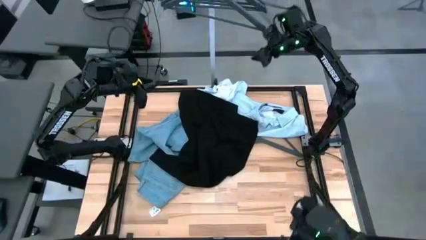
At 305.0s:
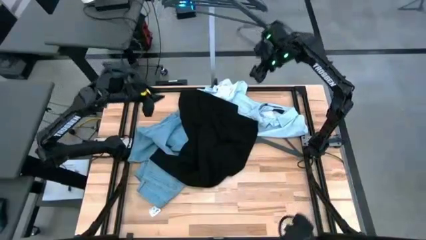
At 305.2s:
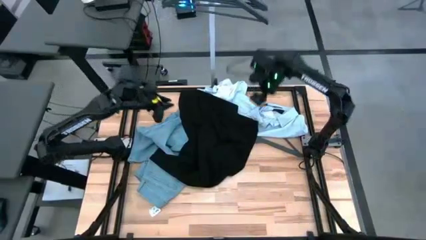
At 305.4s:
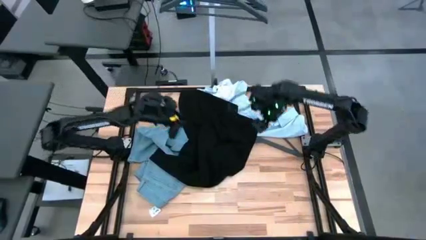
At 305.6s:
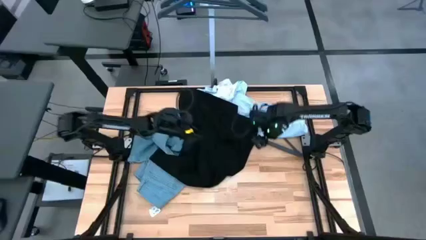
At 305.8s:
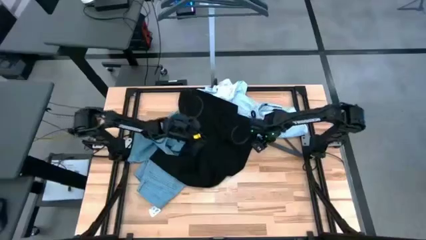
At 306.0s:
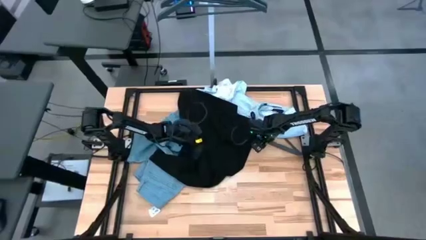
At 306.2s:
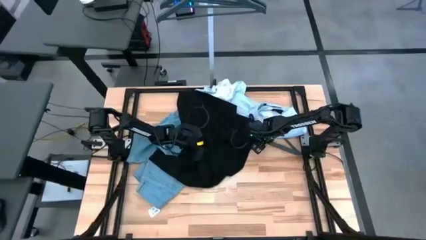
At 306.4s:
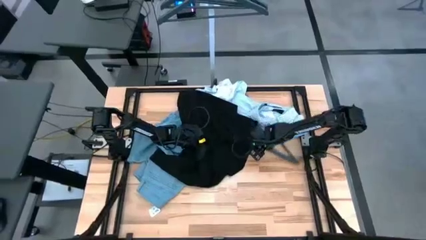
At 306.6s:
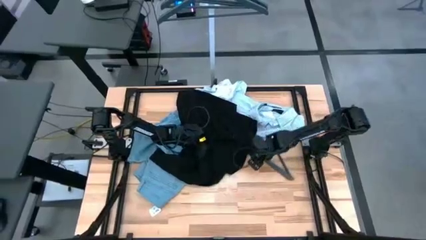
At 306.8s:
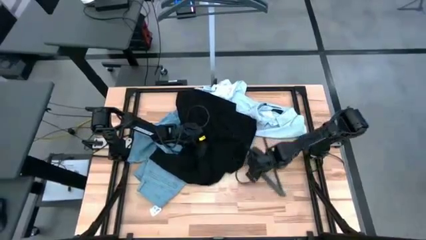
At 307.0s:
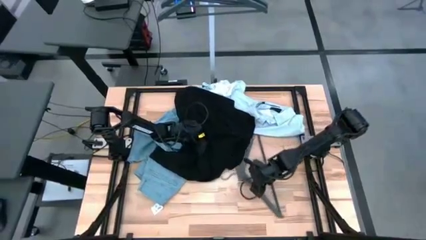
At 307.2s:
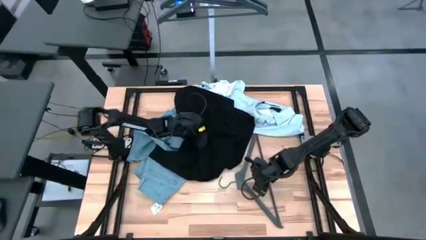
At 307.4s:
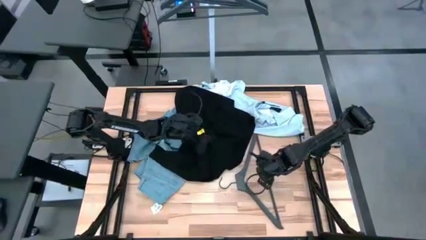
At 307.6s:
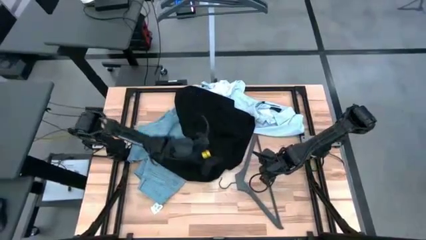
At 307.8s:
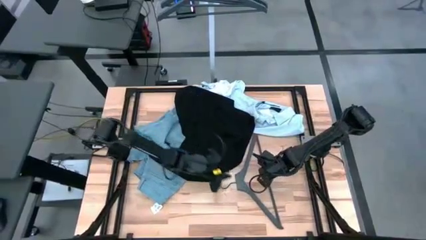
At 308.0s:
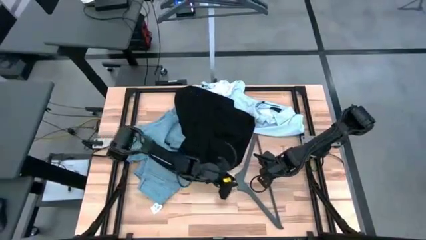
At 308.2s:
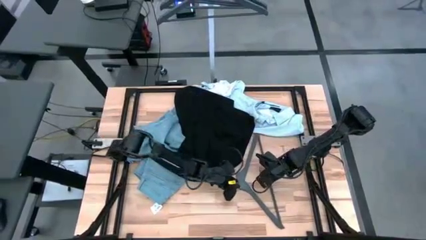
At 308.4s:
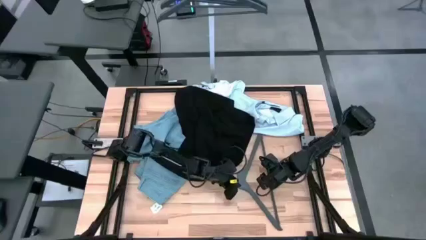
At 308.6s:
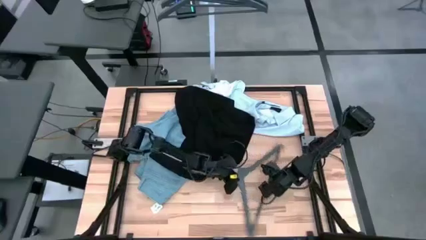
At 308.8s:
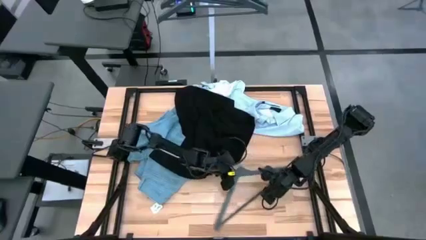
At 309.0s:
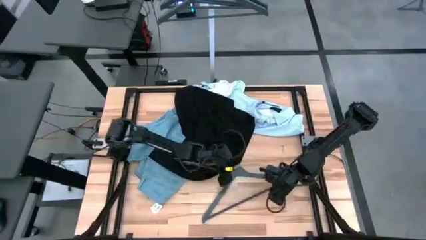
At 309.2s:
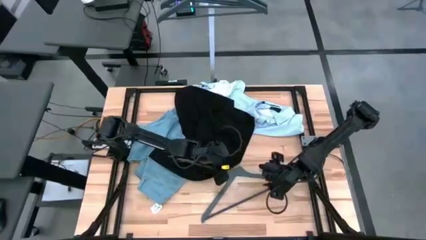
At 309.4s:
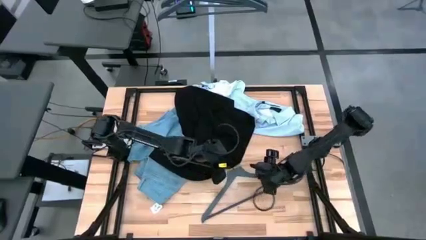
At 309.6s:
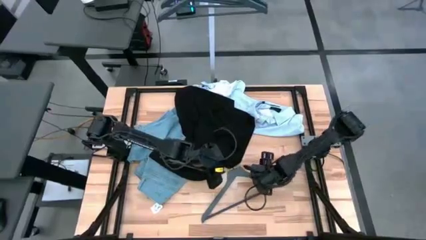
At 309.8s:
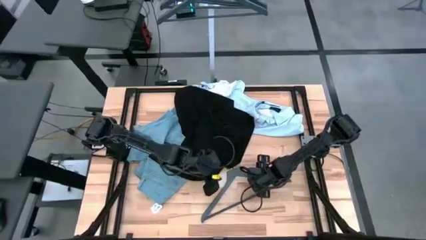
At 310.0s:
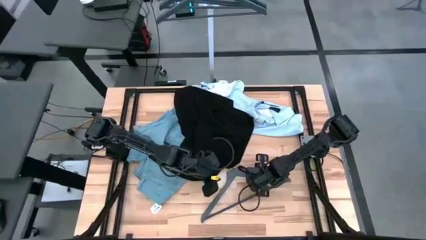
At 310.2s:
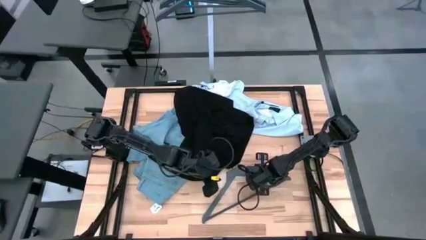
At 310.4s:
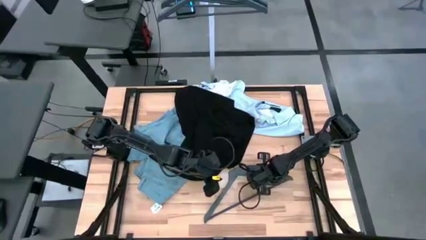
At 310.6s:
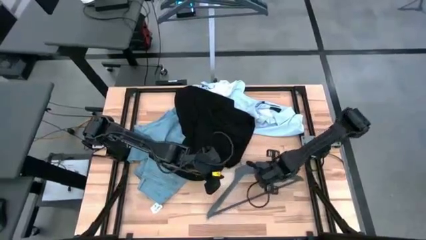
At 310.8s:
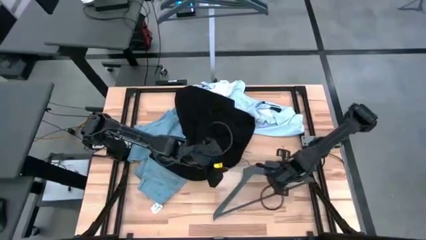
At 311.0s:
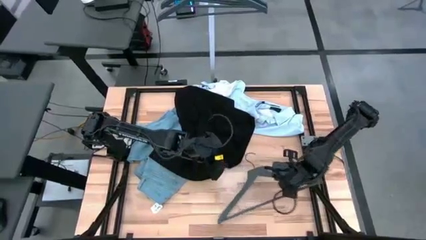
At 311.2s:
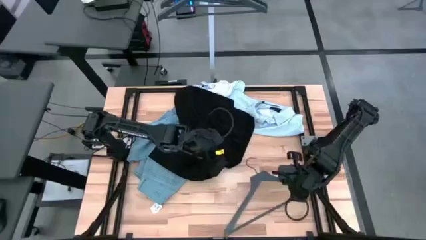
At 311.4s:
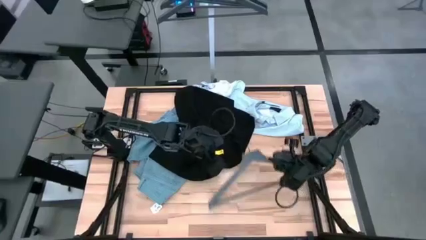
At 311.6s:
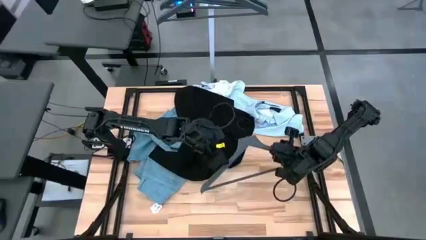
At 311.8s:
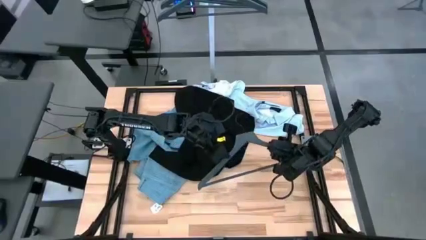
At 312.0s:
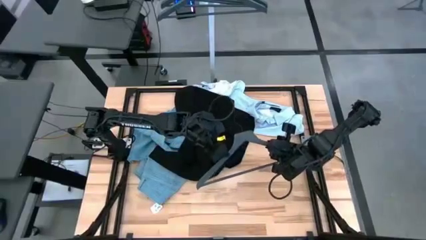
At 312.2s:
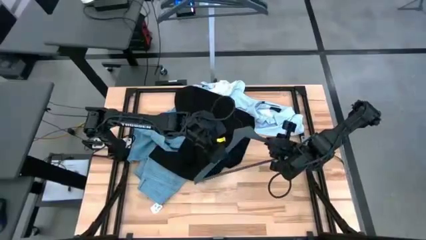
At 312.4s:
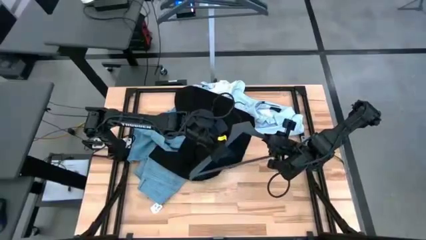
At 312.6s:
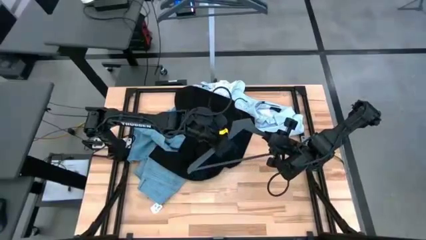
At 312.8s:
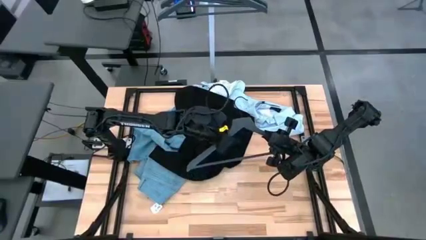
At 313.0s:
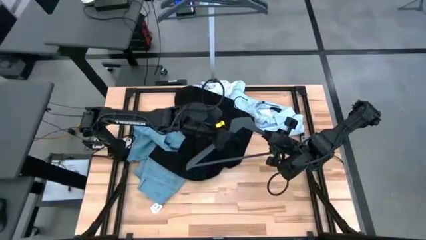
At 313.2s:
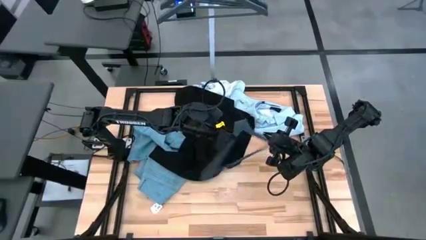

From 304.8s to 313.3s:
Task: Hang clothes
Hang the grey hanger on the rack

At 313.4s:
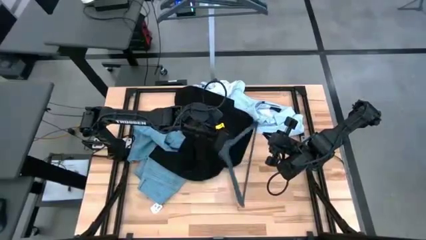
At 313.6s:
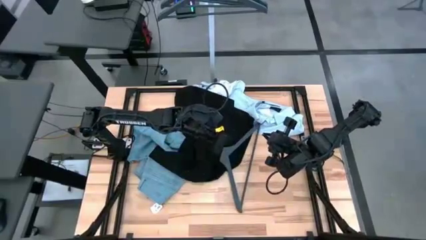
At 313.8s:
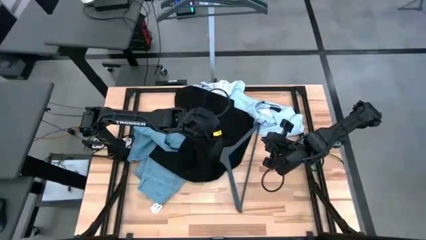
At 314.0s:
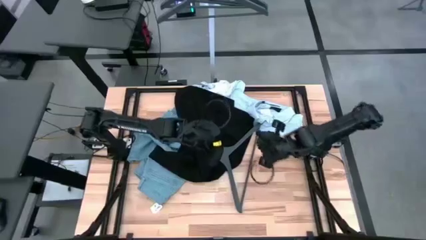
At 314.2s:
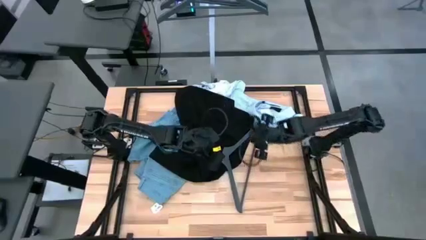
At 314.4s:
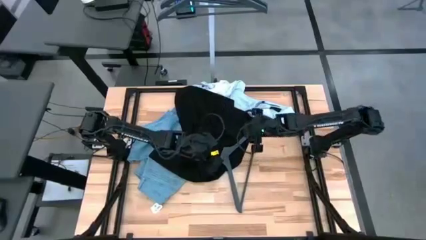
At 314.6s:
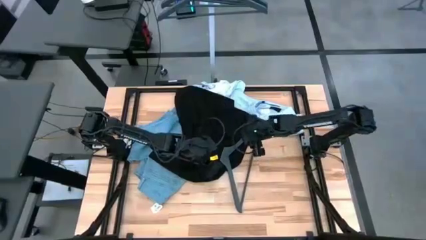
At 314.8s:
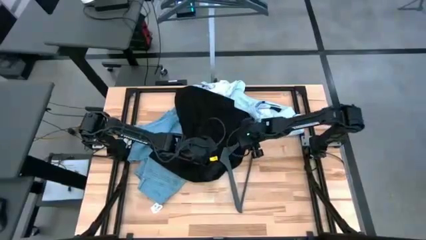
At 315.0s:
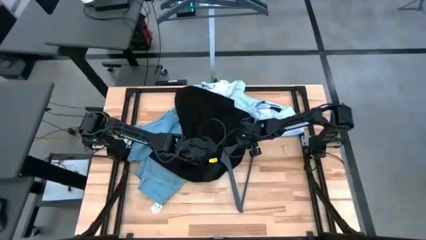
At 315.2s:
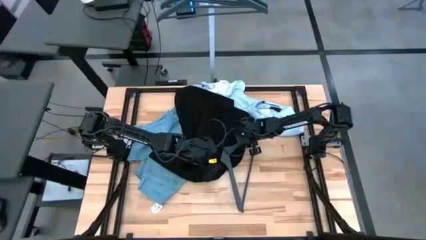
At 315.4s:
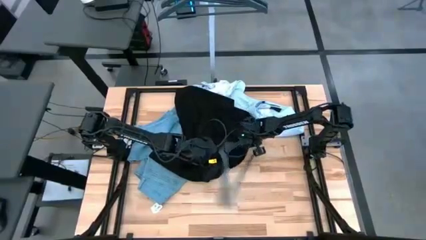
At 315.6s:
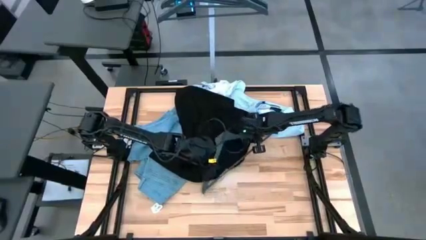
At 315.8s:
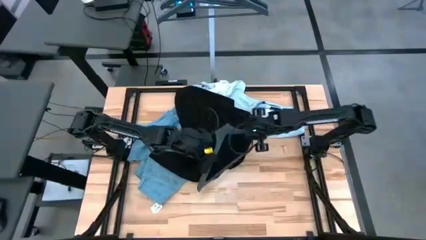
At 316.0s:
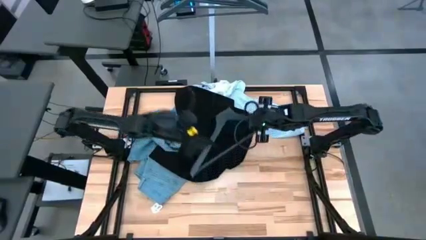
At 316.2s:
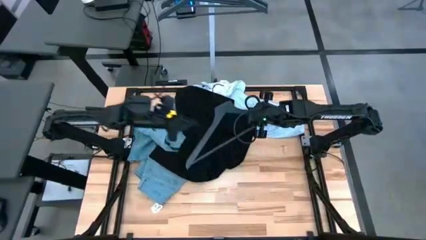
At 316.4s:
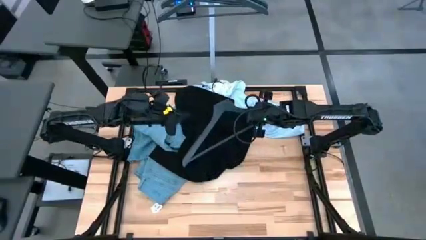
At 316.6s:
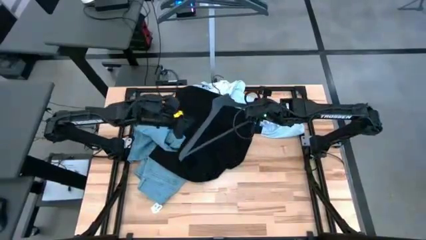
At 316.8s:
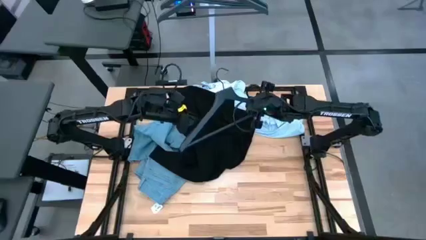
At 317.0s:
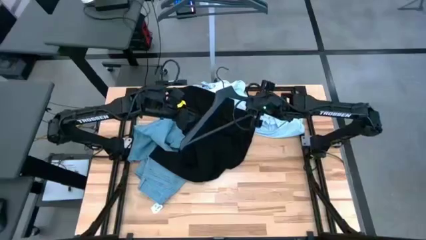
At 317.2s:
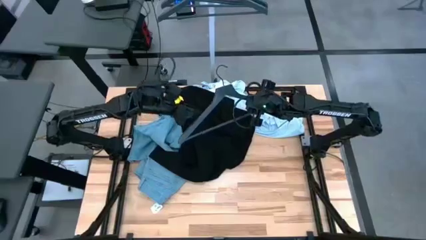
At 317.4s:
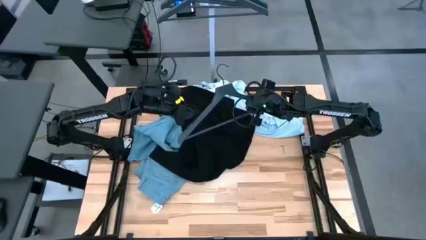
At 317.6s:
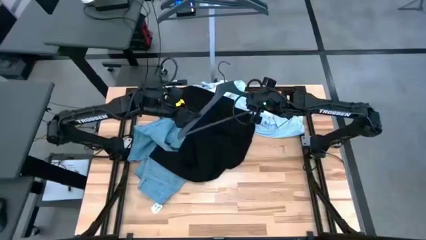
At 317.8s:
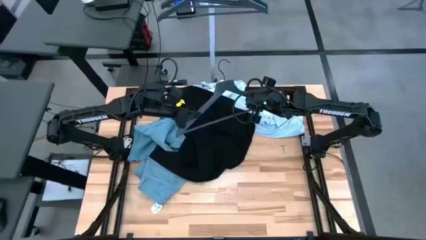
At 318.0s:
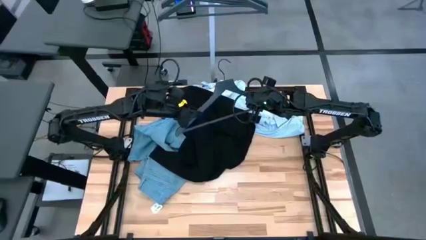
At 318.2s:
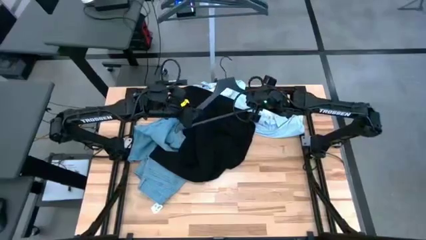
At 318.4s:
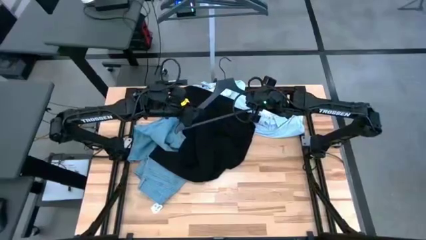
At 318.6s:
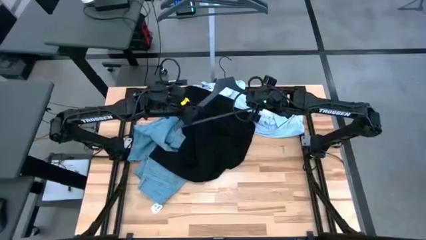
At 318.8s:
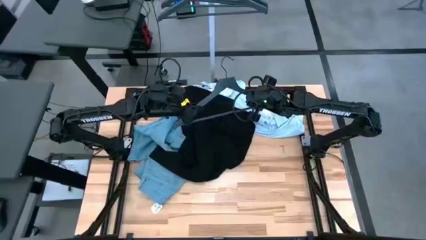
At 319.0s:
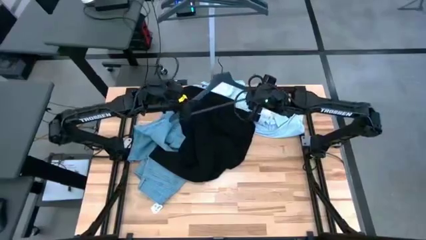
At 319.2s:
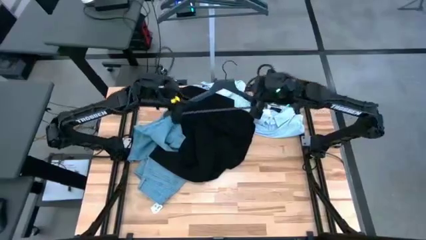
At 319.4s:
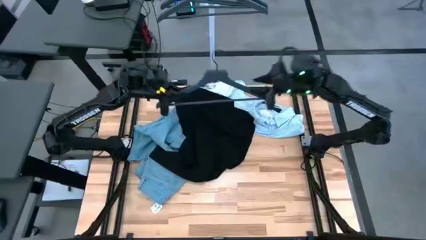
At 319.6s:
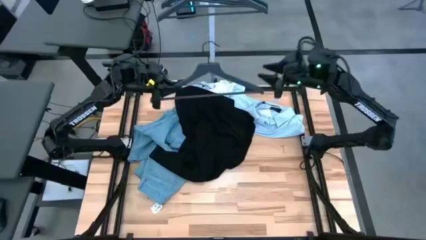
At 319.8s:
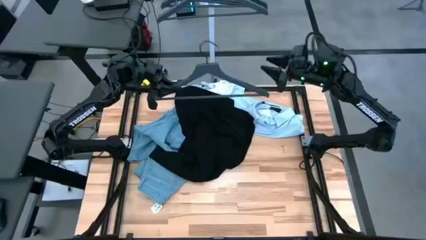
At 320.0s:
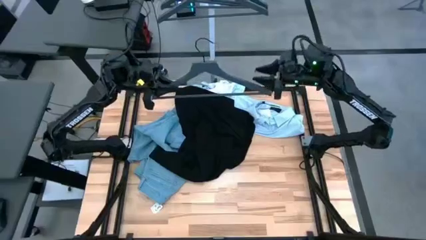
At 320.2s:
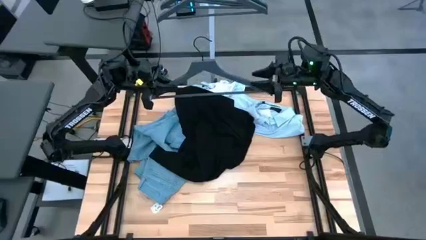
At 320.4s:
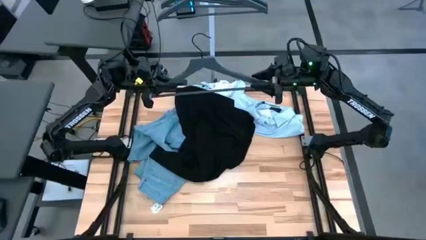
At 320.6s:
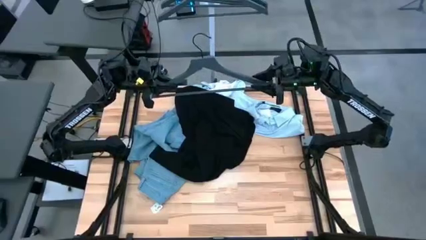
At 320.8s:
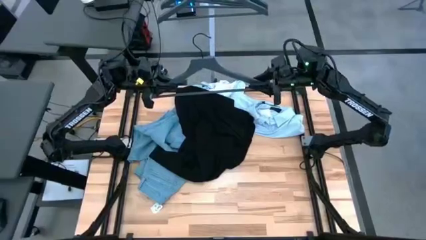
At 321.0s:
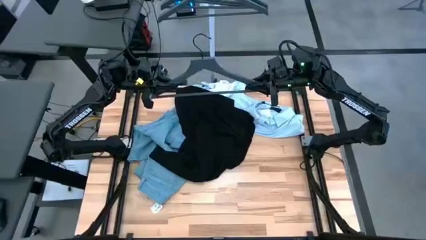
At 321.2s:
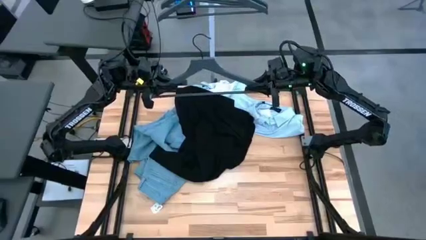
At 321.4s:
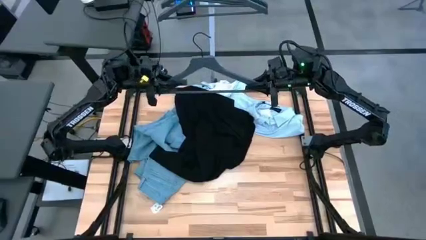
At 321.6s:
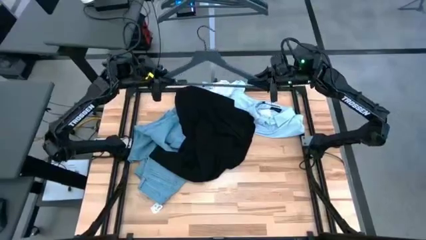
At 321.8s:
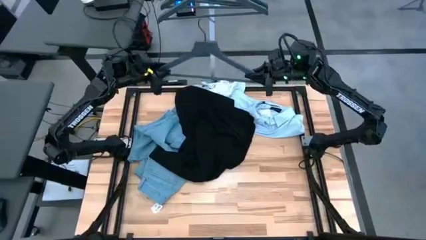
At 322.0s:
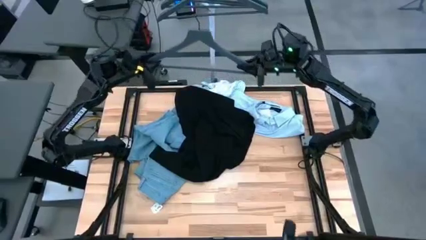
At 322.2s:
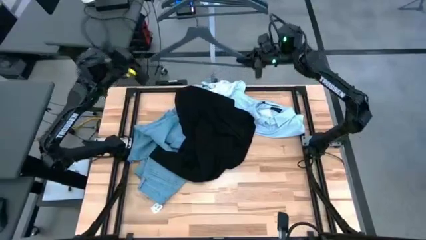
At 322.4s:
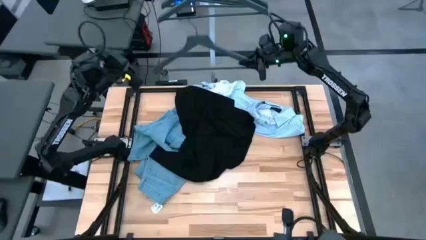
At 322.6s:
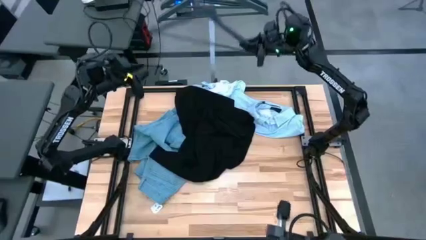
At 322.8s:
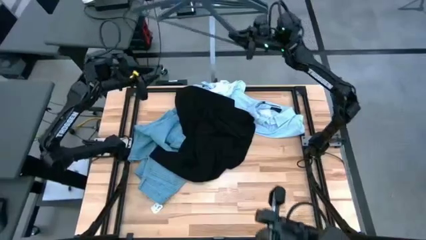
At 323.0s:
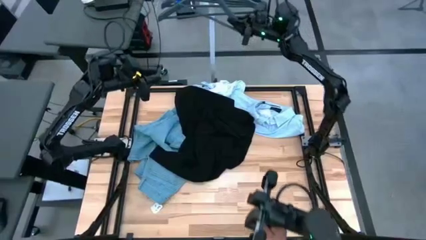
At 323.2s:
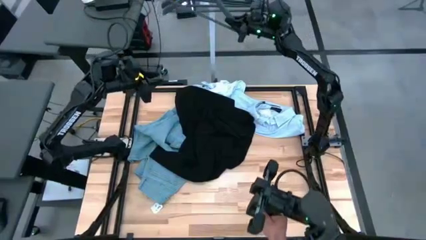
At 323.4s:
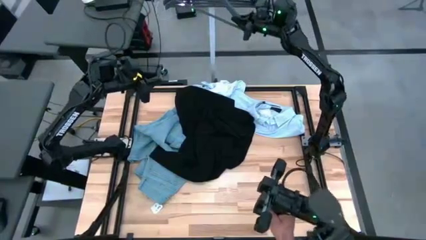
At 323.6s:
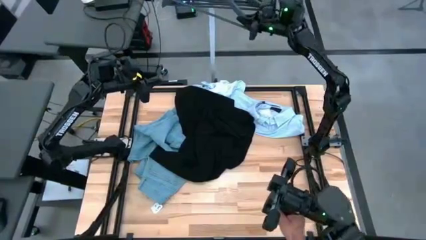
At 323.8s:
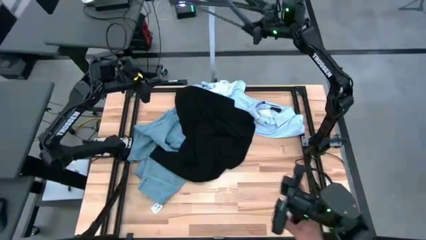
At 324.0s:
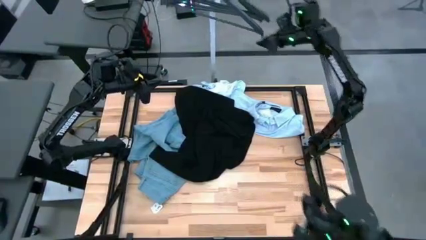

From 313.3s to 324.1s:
Hang the grey hanger on the rack
